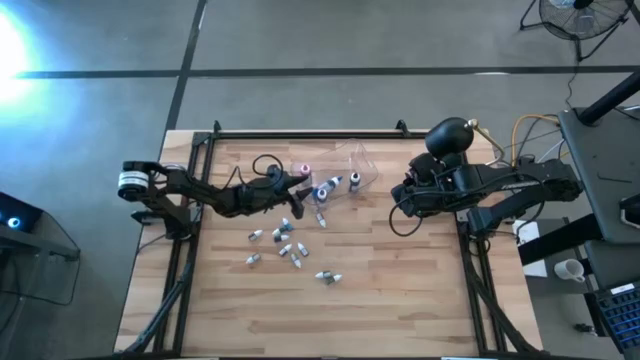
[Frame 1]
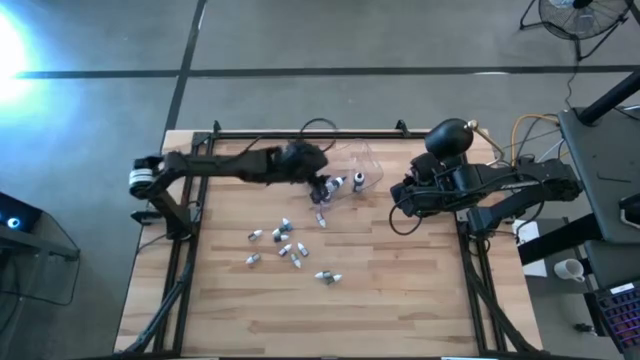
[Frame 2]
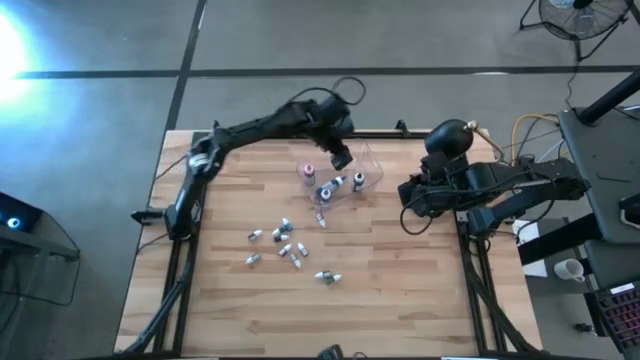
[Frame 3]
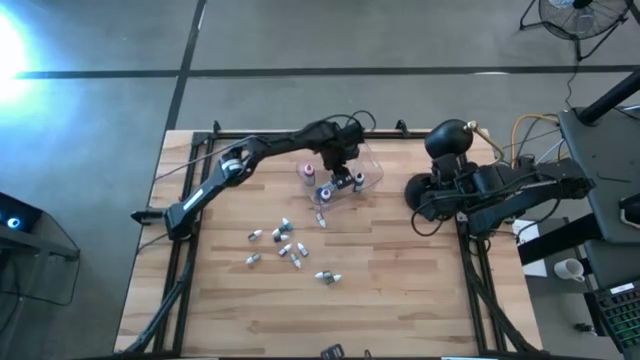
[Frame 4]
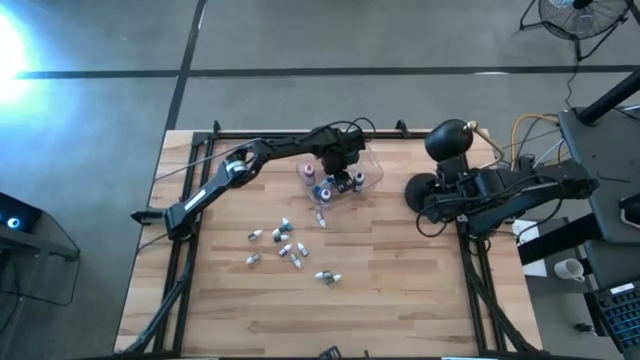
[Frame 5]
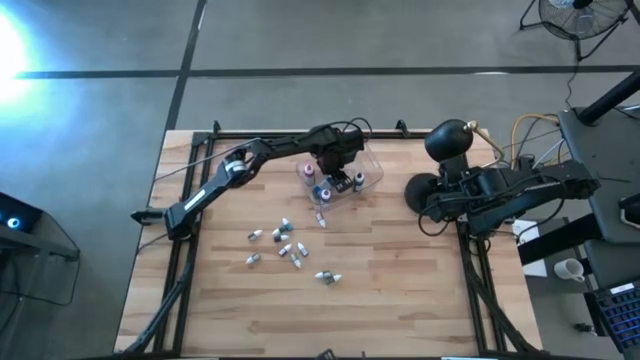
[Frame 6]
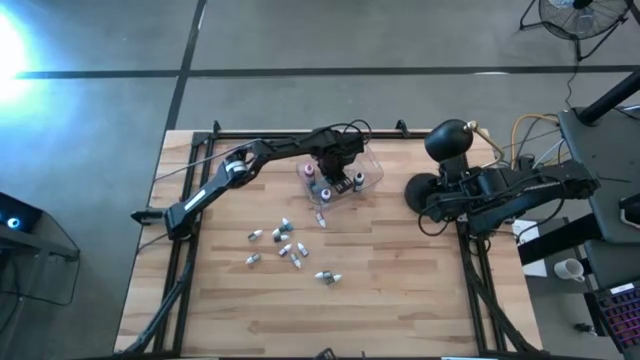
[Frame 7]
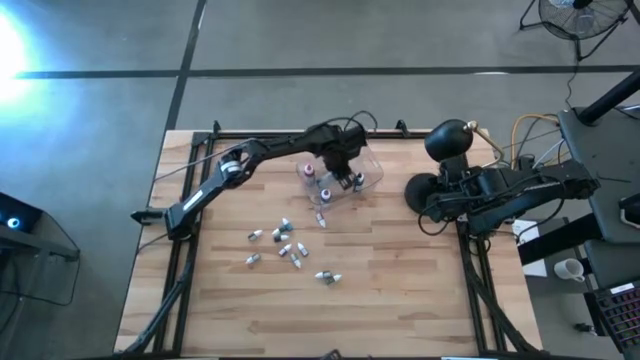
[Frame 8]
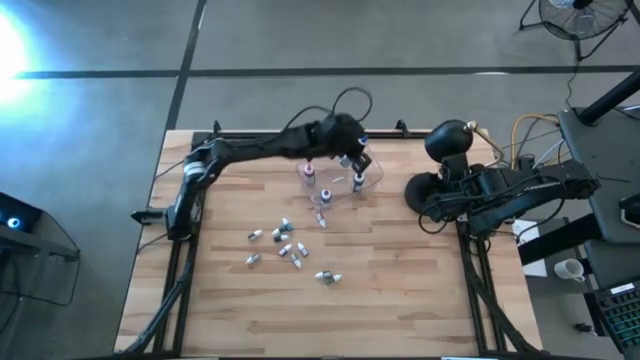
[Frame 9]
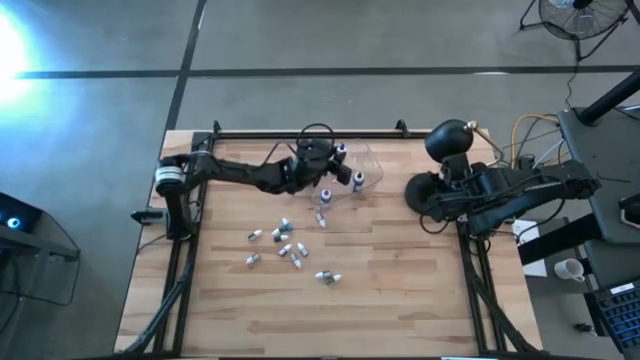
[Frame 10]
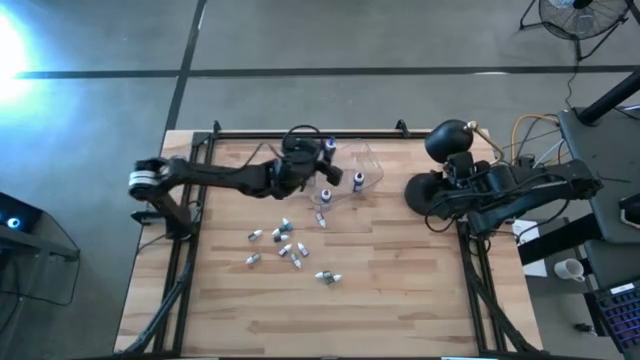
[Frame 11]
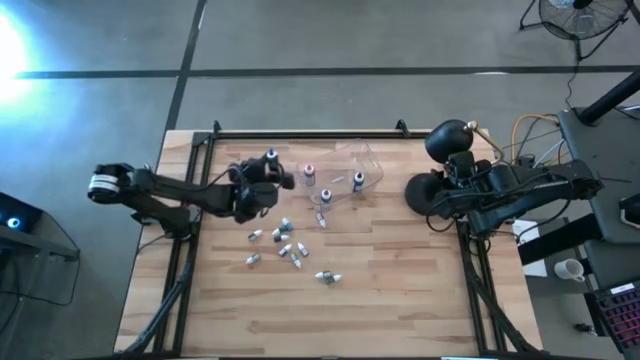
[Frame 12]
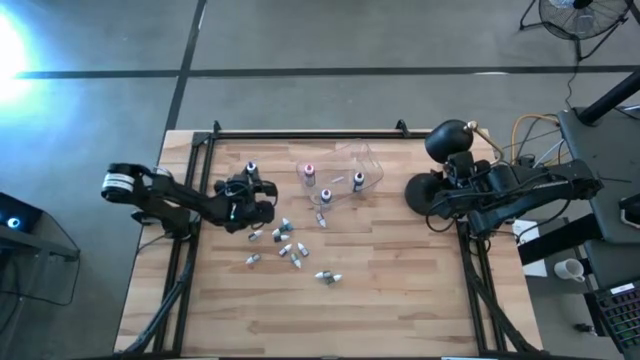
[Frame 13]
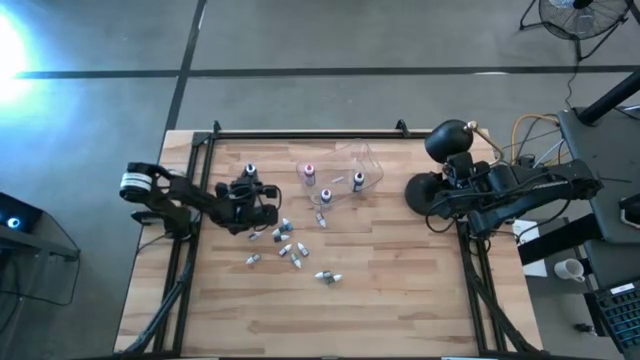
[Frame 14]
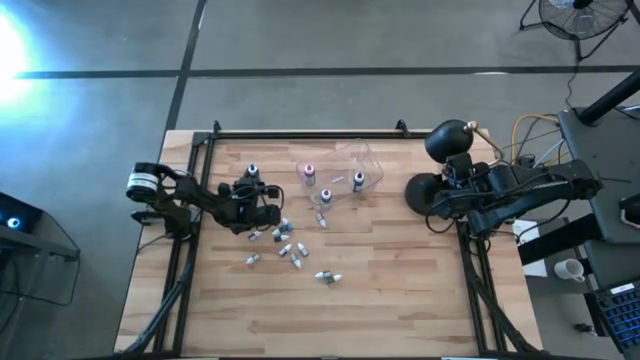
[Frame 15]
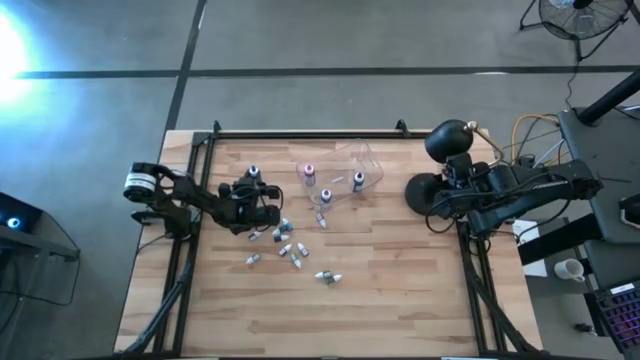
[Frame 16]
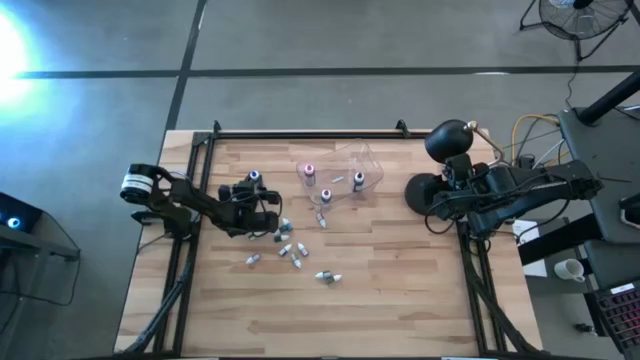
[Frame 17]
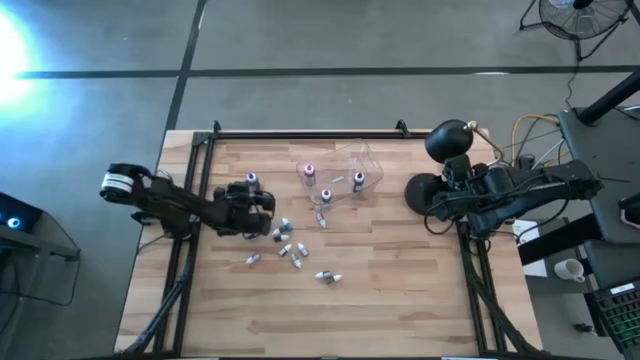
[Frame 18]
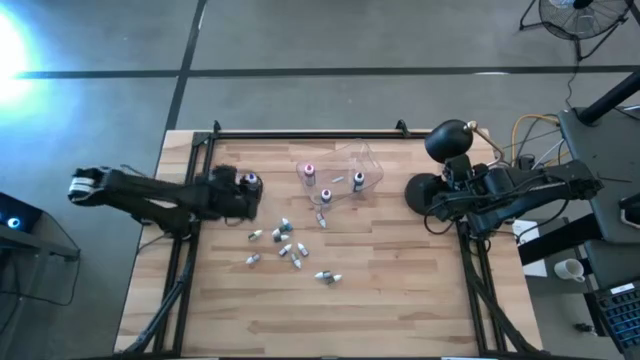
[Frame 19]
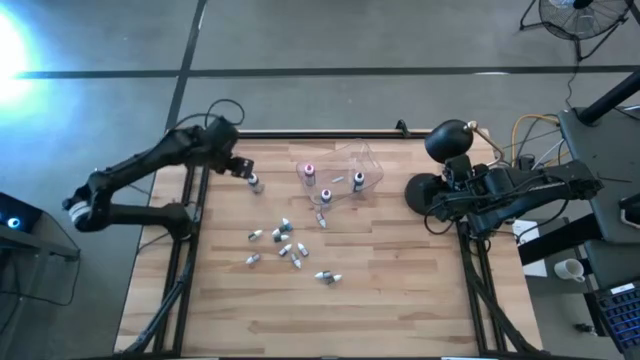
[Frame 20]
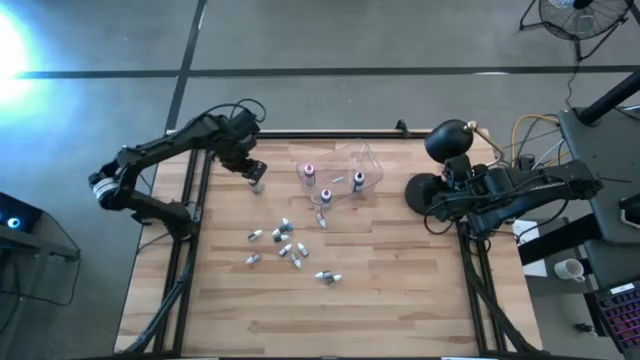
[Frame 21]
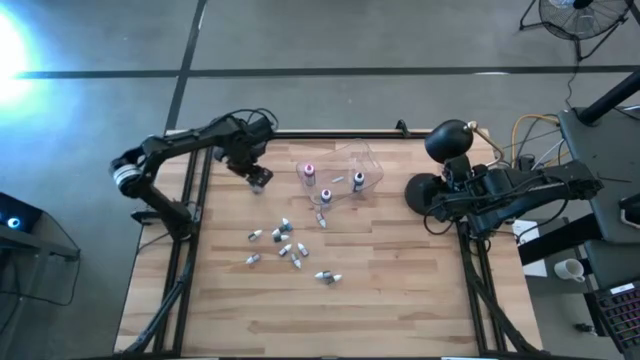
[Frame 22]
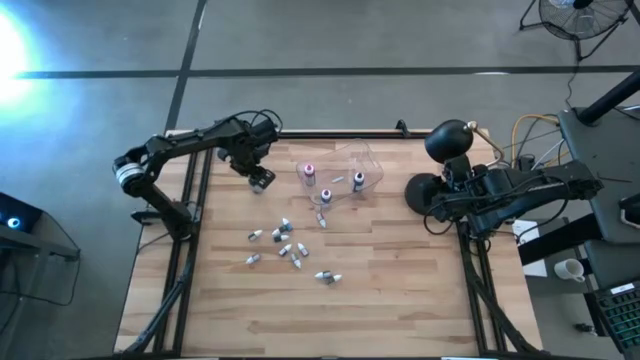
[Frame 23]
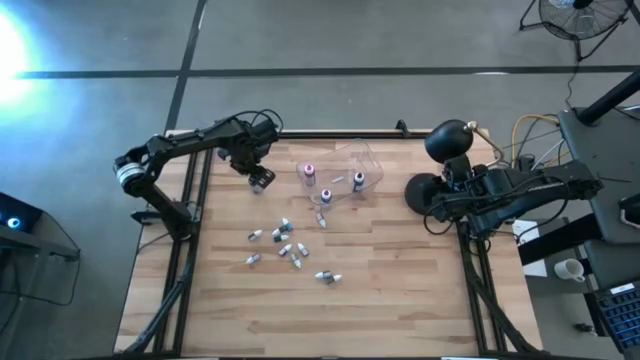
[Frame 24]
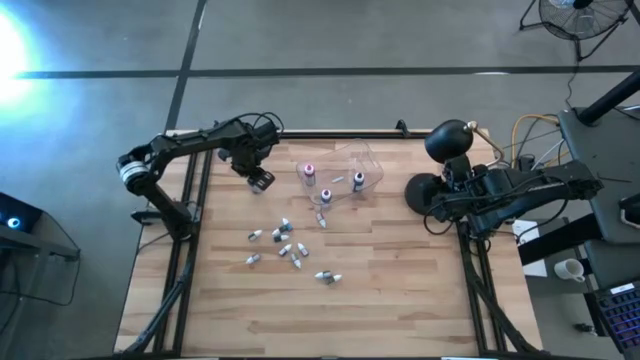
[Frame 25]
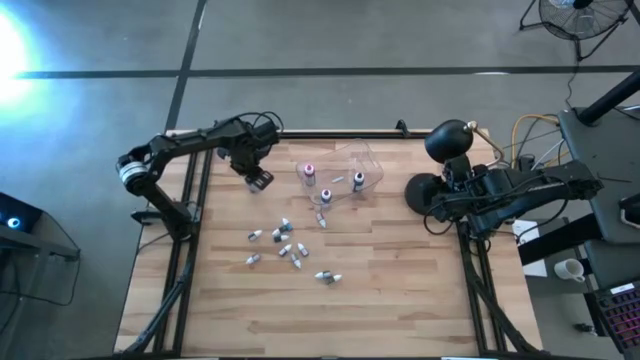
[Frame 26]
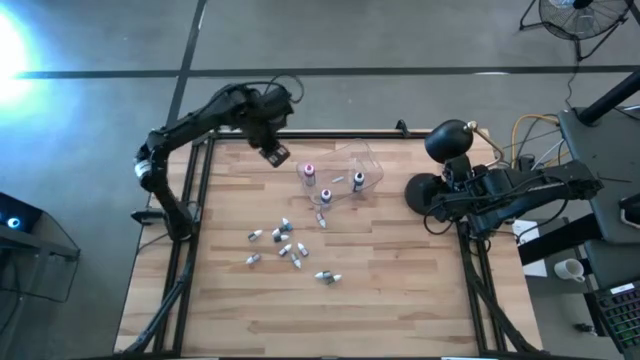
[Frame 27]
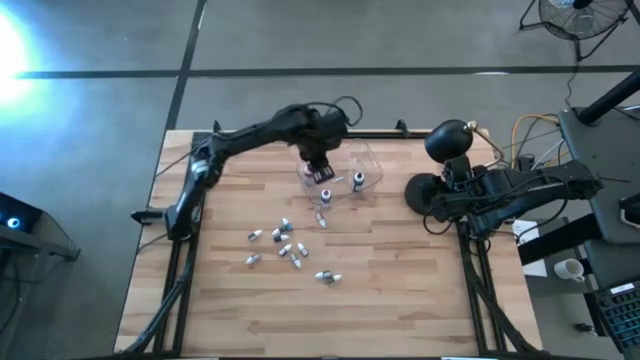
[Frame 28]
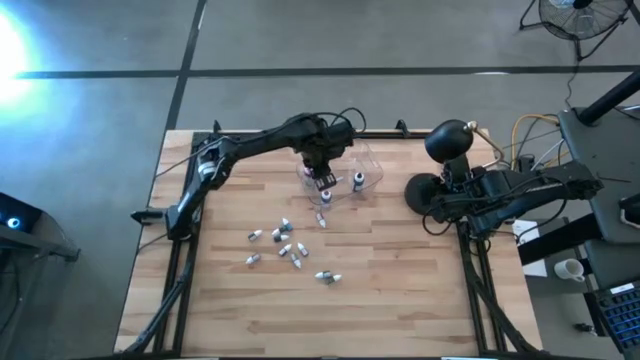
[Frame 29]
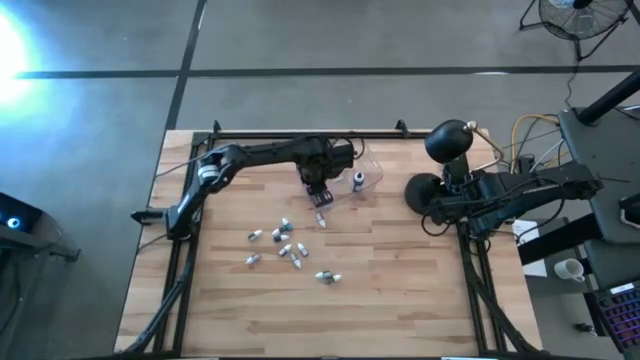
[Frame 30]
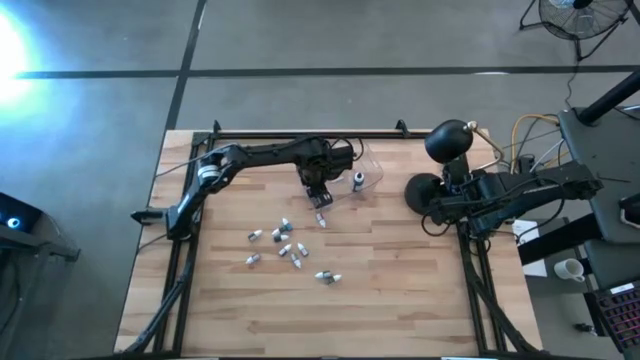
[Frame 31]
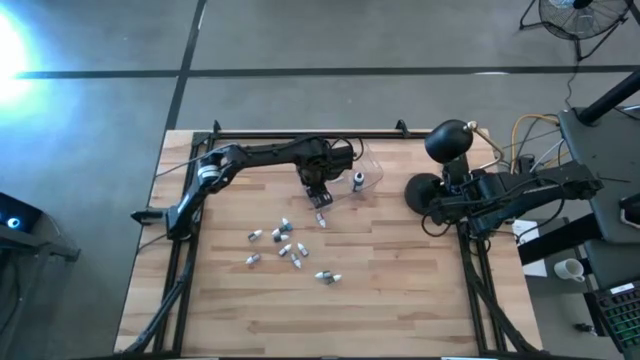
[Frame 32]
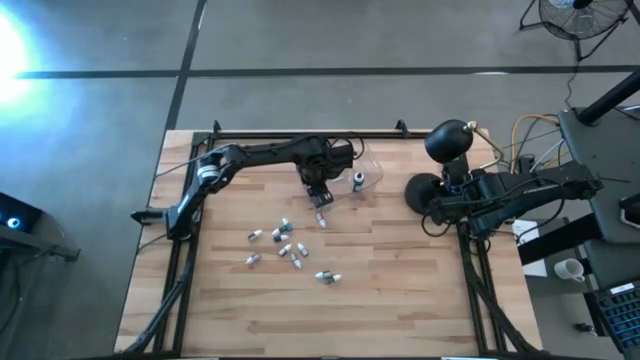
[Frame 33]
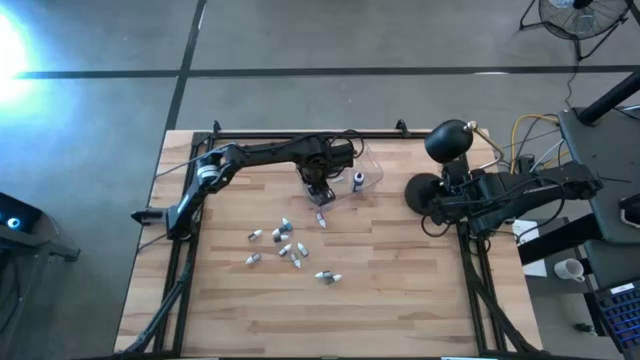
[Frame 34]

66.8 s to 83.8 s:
Task: Pick & Place food coloring
Put the large blue food coloring bottle into the transparent bin

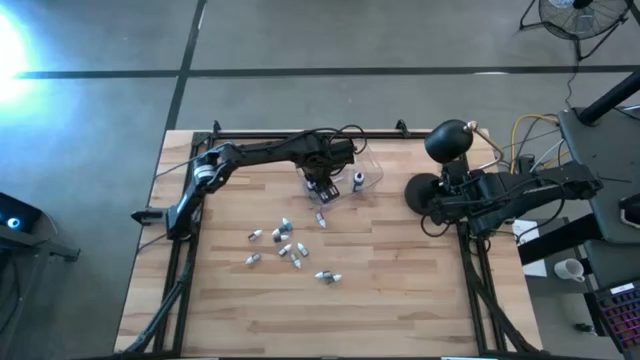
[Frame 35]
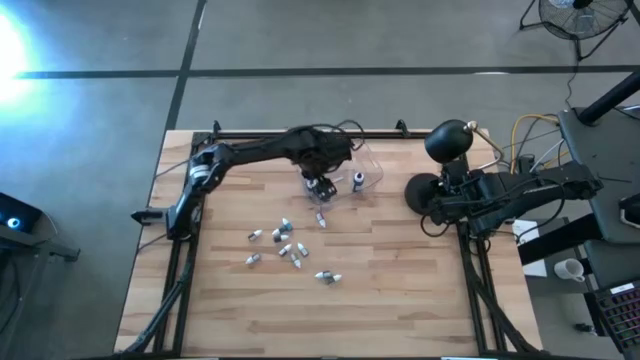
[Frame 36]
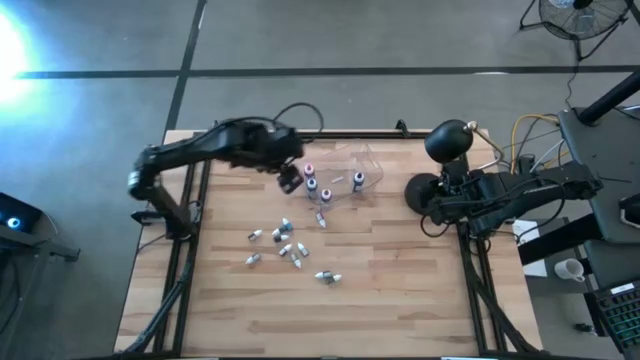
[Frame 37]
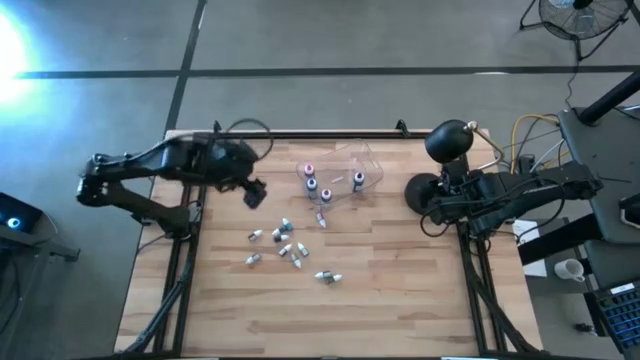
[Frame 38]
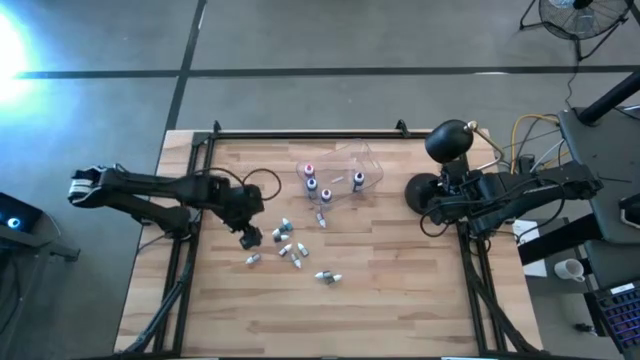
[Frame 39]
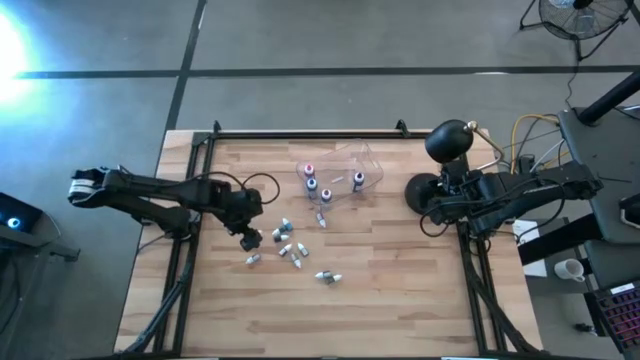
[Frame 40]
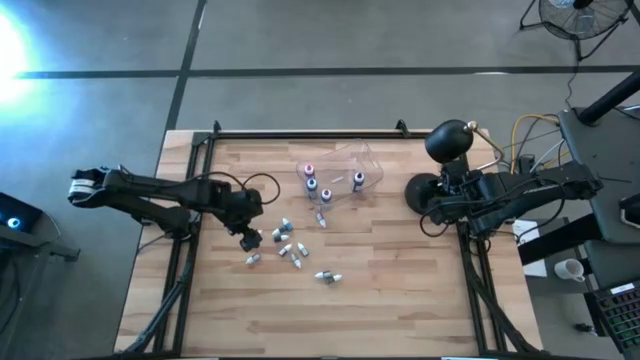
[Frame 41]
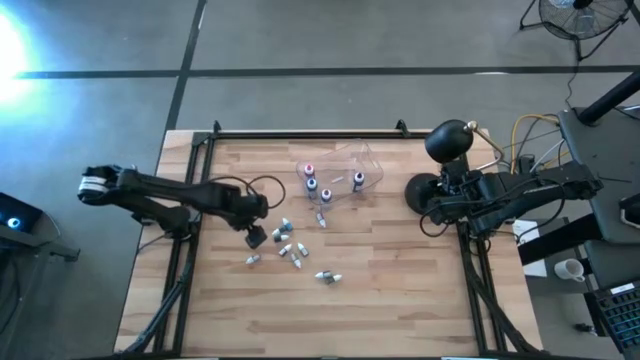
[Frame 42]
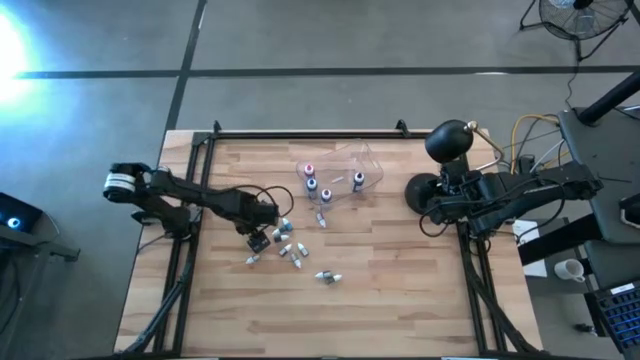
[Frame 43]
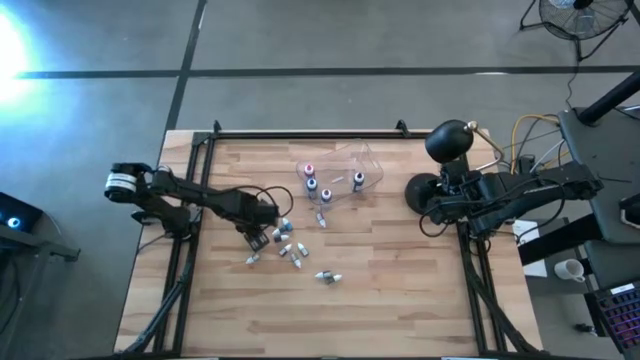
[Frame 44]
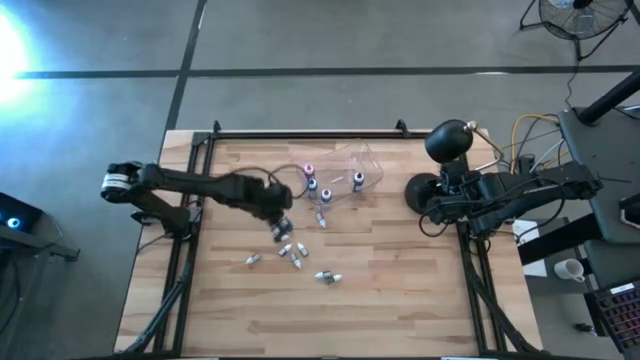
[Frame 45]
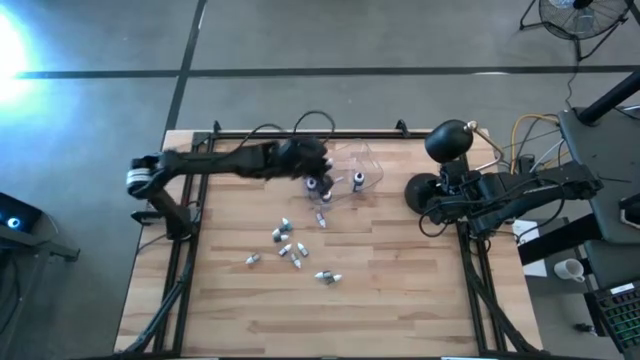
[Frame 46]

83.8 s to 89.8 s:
Put the left small black food coloring bottle into the transparent bin
